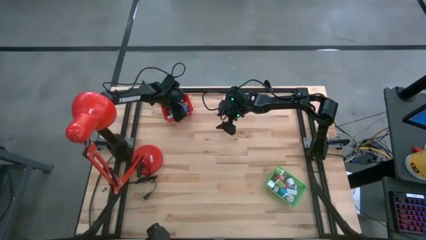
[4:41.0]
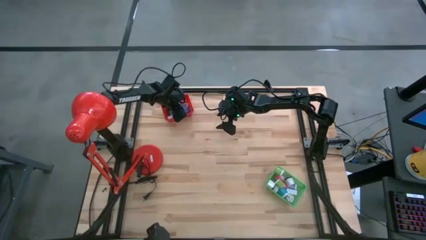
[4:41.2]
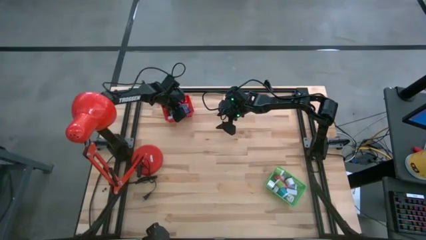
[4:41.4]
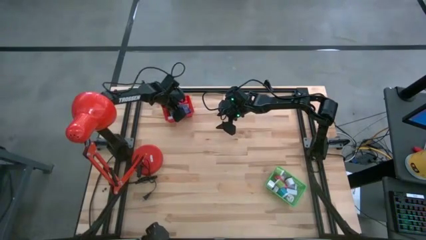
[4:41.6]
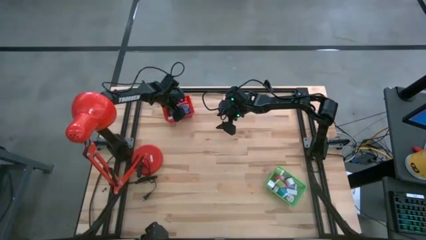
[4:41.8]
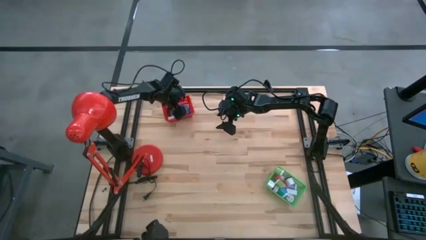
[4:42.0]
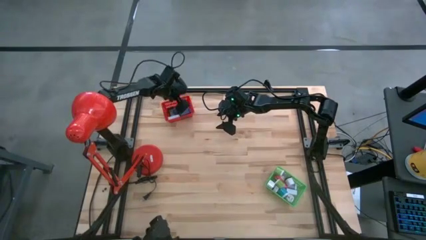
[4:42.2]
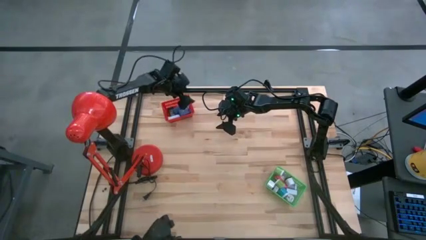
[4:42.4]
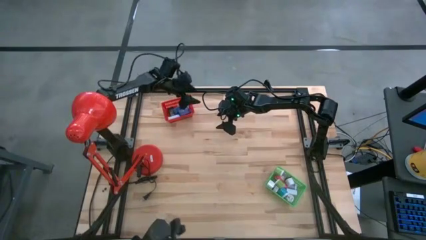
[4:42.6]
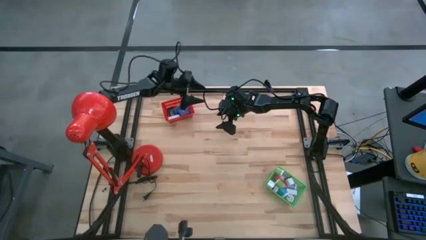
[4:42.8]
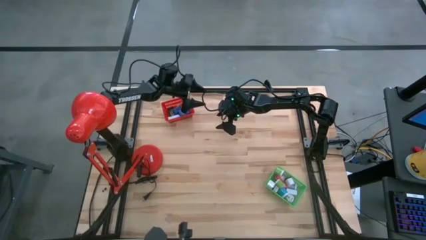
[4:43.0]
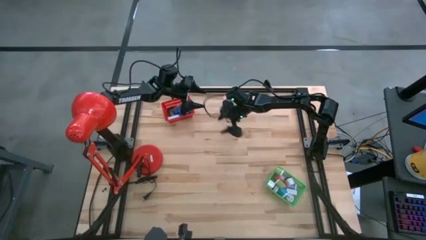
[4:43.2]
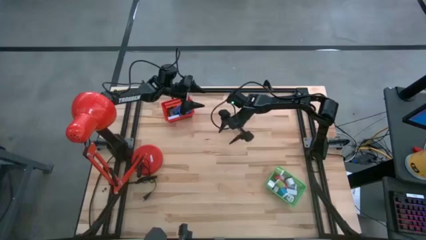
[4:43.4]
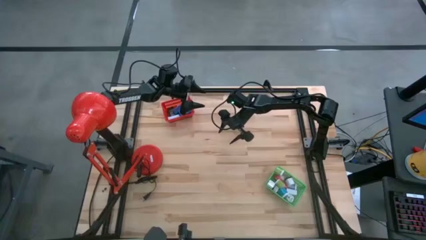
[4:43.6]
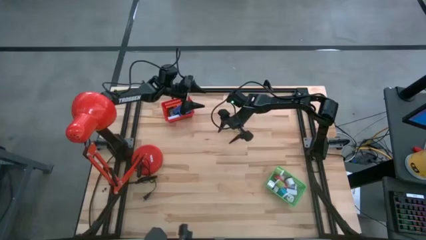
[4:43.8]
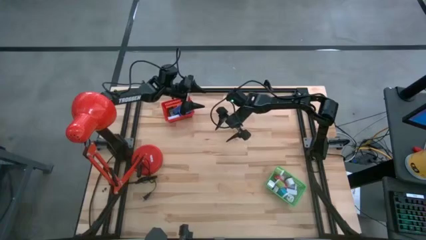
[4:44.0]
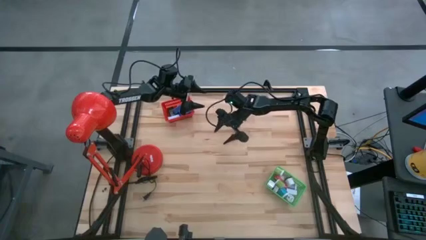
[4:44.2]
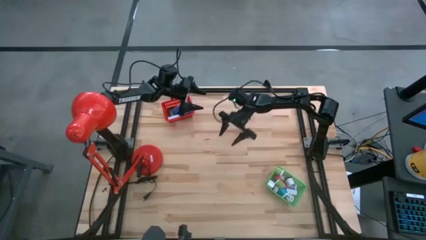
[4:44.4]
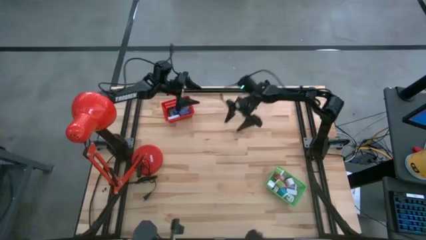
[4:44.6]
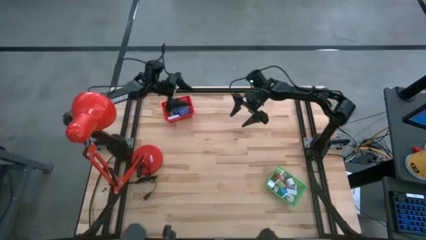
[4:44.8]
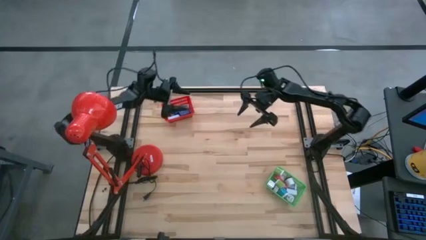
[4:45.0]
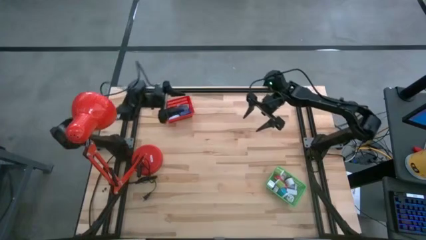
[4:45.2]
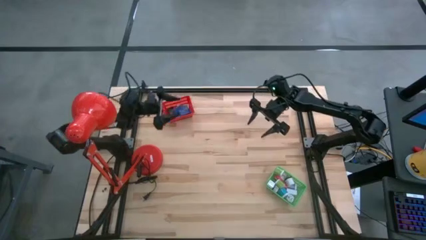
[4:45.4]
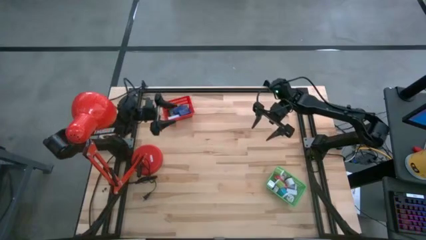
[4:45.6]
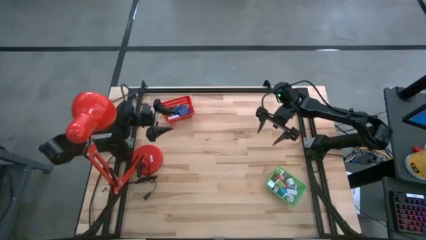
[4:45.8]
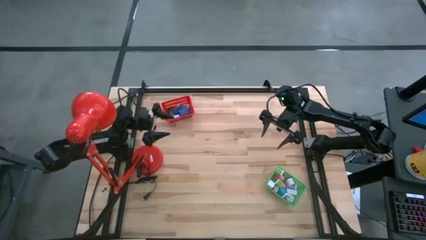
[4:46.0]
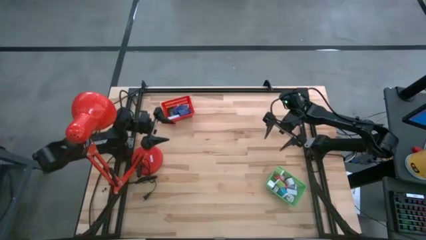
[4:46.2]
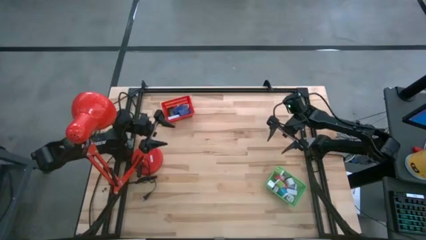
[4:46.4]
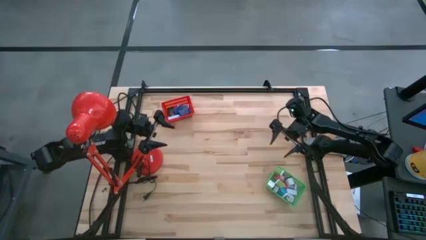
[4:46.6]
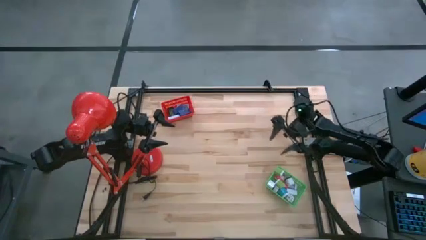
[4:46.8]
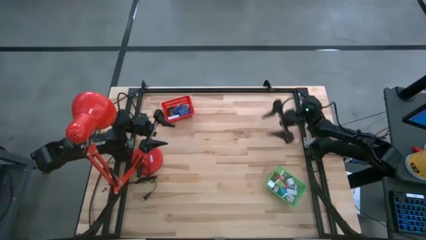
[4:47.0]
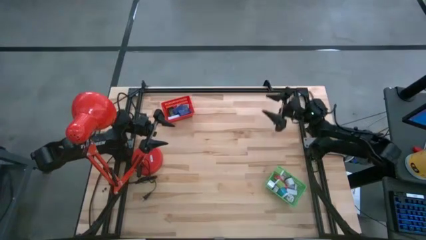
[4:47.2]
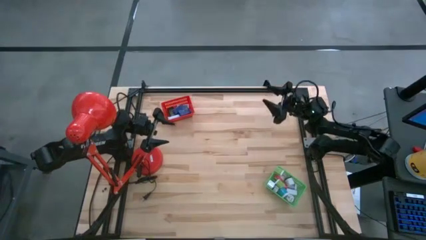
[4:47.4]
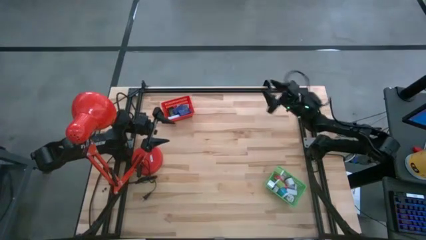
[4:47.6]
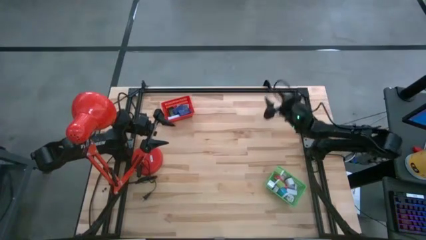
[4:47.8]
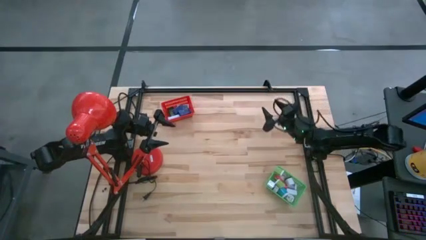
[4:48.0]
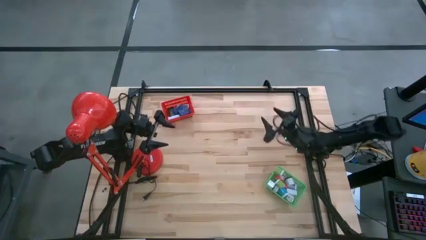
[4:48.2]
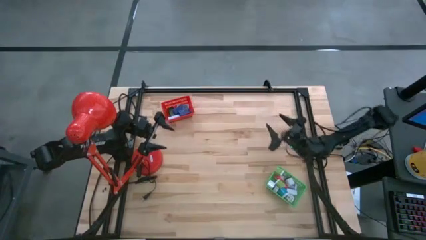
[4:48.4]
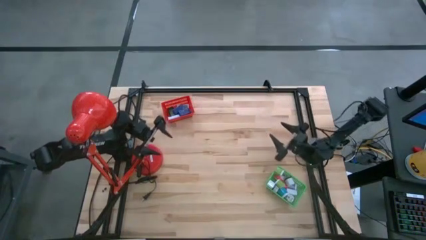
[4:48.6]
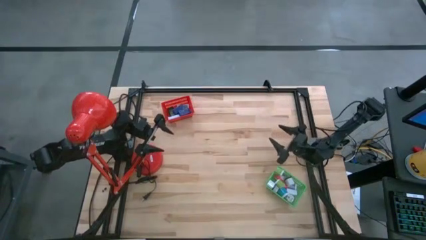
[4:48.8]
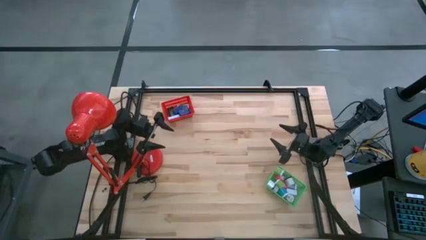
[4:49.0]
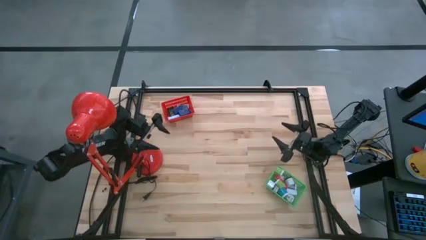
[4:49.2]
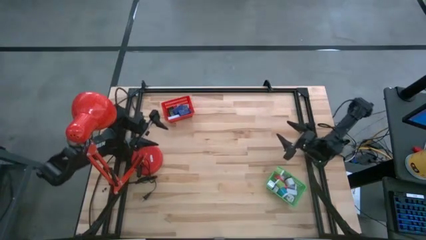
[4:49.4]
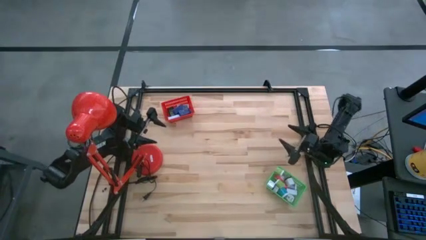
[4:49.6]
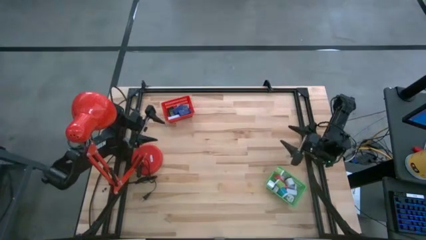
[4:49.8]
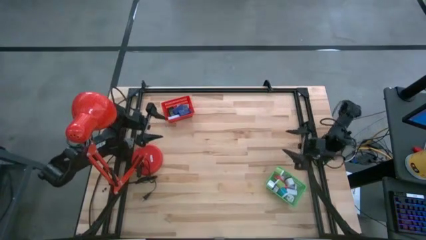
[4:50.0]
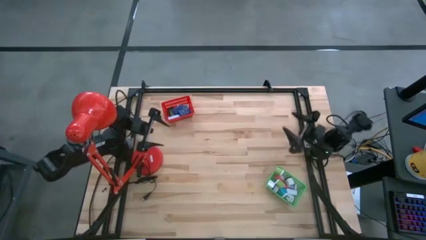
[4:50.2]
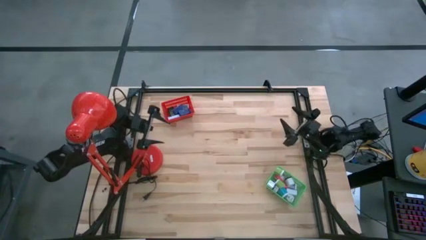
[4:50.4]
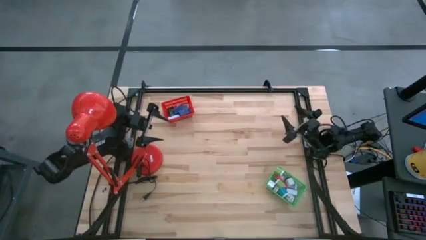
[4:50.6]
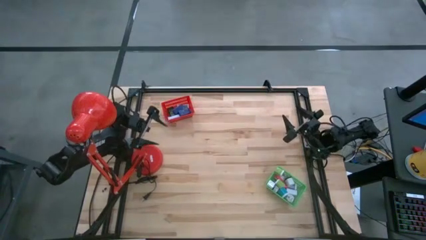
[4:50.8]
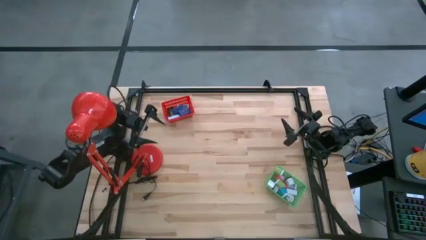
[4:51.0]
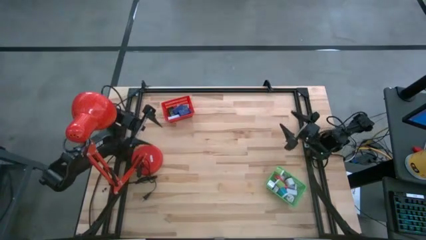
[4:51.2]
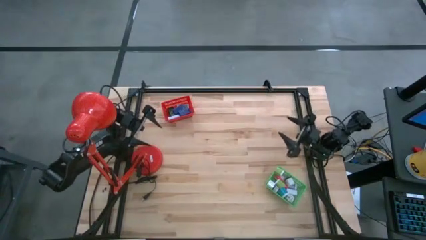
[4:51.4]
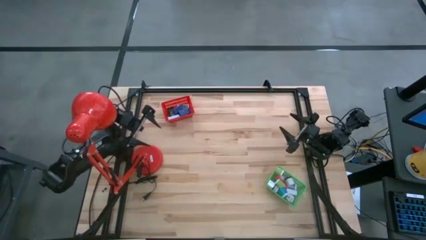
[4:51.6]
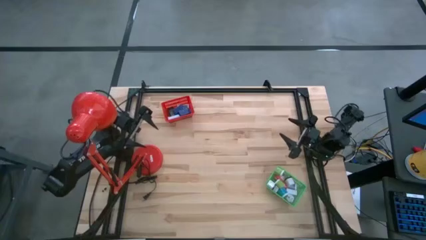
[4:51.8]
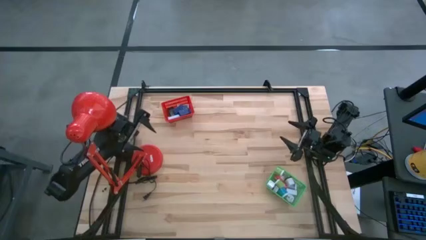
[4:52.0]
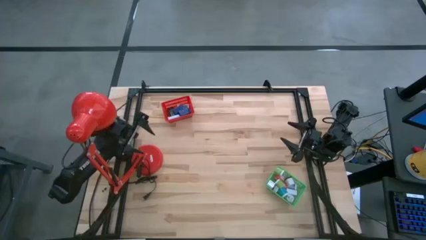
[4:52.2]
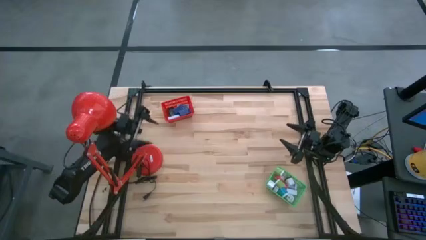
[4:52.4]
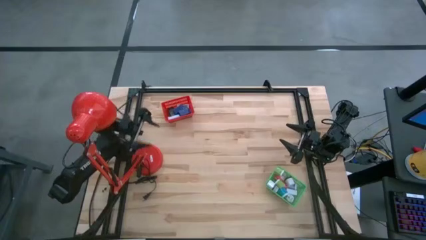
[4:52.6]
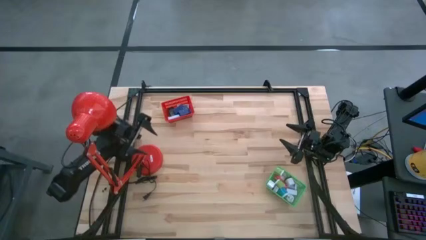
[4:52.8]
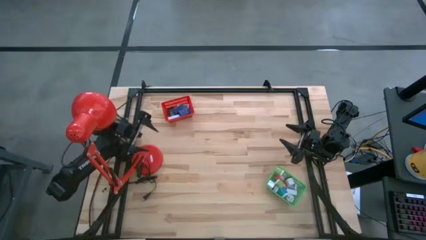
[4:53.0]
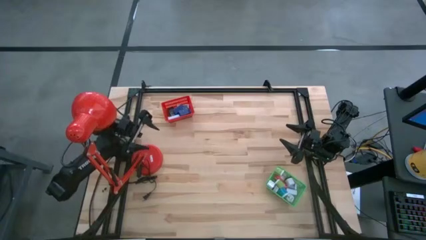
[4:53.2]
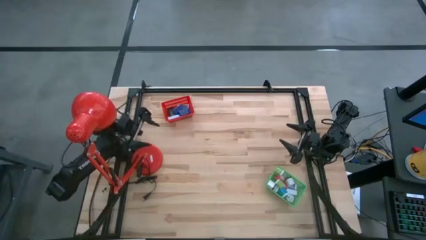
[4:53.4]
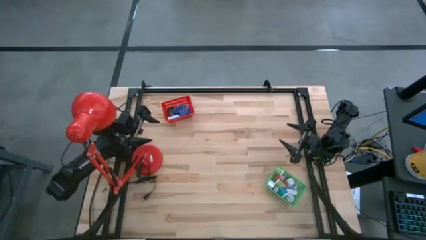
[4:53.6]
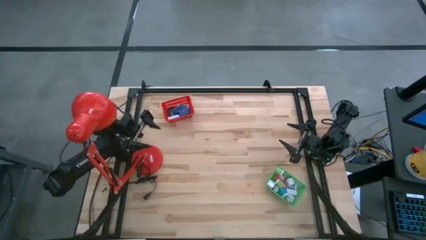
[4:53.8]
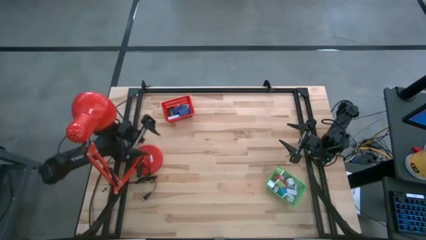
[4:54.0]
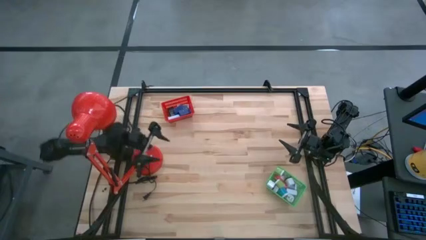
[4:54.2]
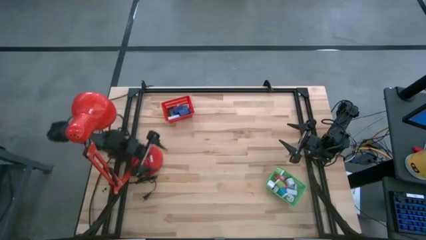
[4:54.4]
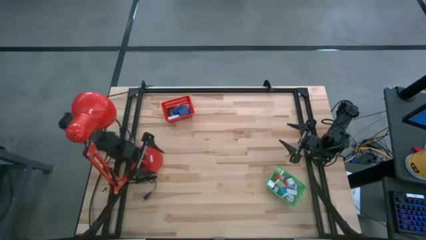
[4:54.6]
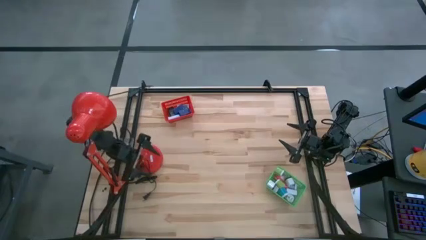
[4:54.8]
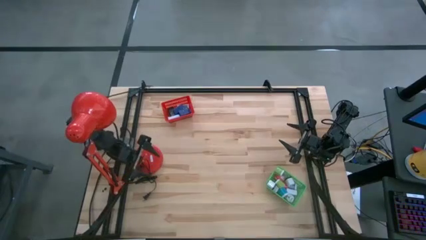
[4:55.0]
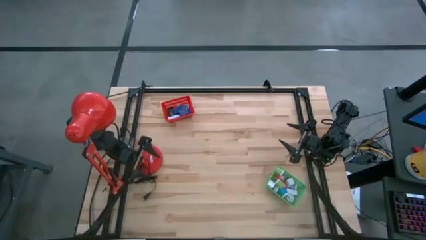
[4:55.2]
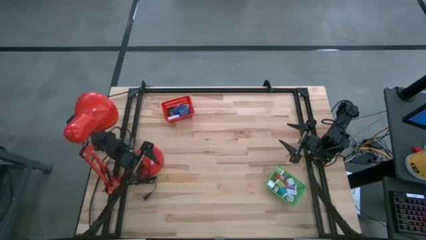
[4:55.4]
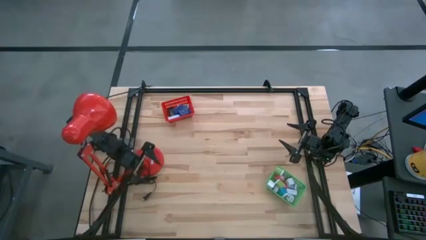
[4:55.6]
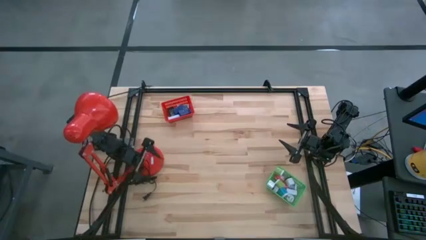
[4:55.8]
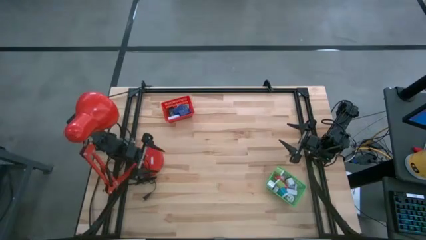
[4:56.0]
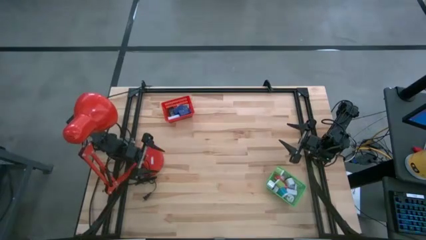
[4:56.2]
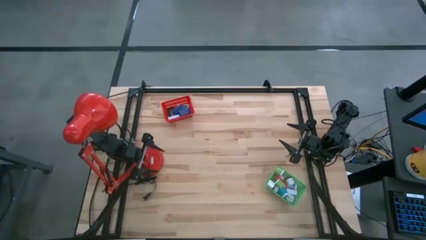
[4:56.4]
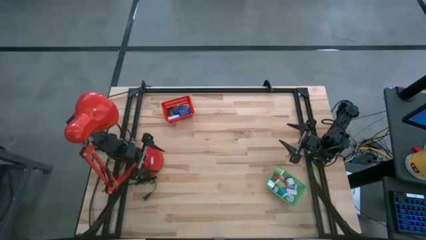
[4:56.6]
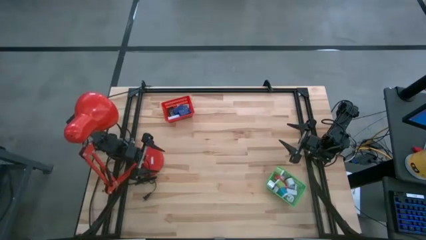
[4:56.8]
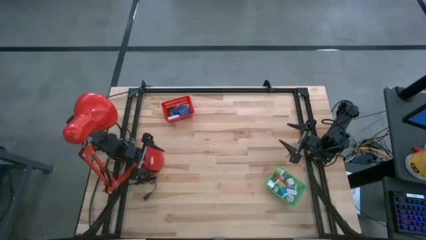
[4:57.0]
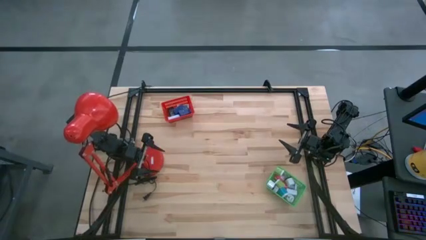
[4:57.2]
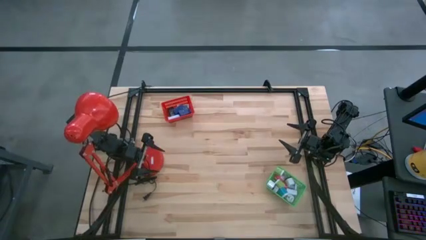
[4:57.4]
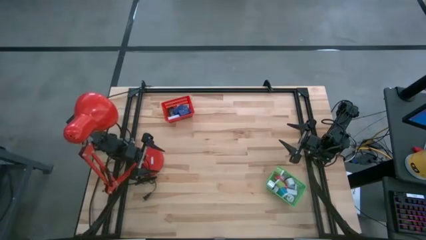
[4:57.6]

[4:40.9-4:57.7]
Task: Pick & Place Office items
Return to Home Position
